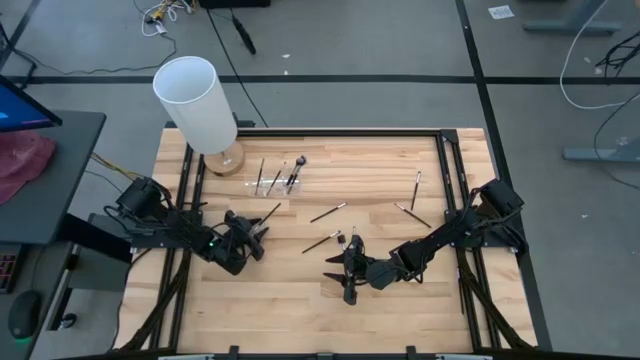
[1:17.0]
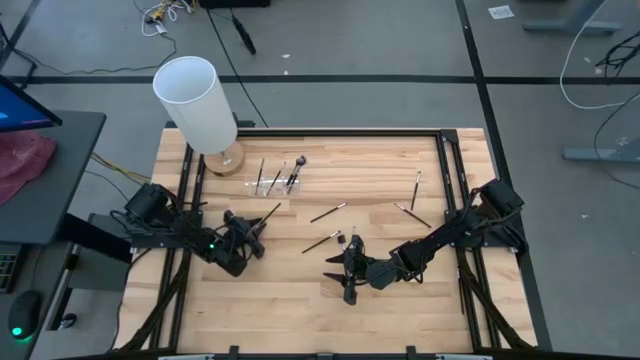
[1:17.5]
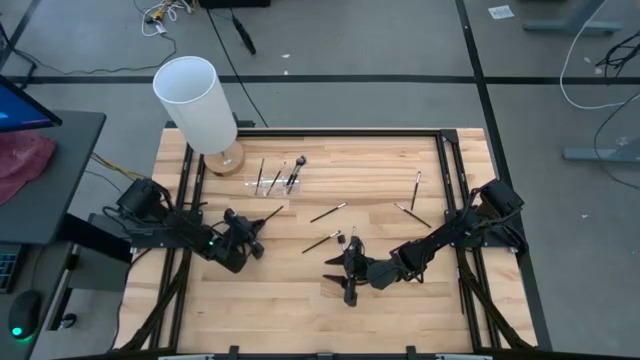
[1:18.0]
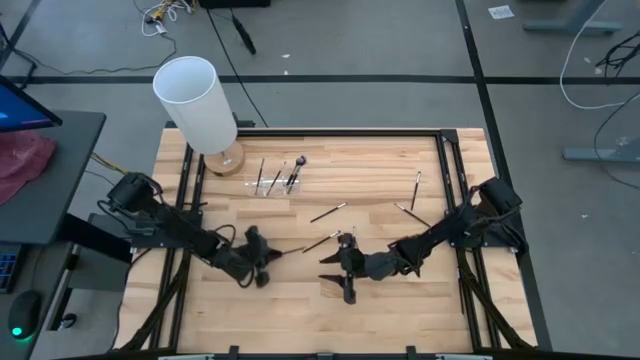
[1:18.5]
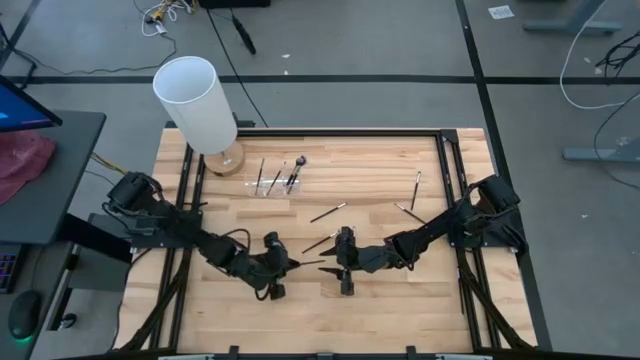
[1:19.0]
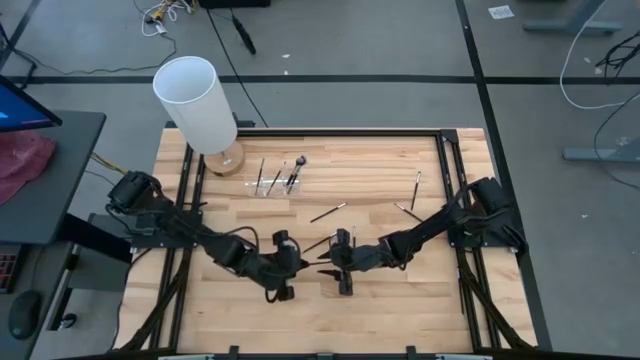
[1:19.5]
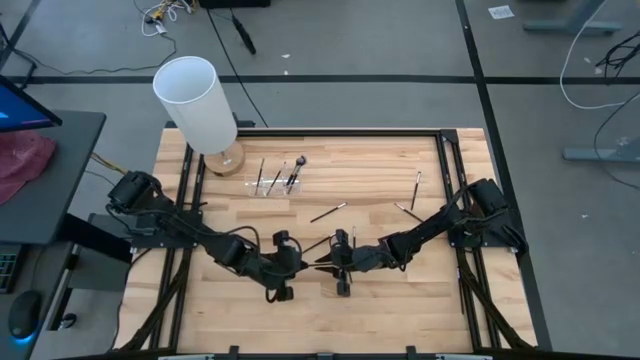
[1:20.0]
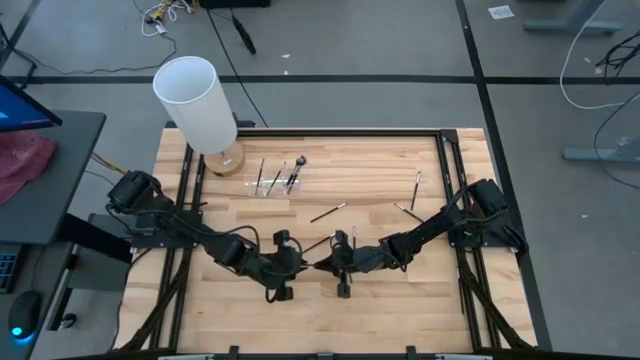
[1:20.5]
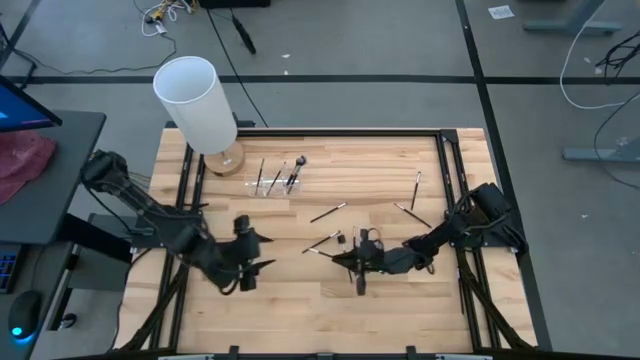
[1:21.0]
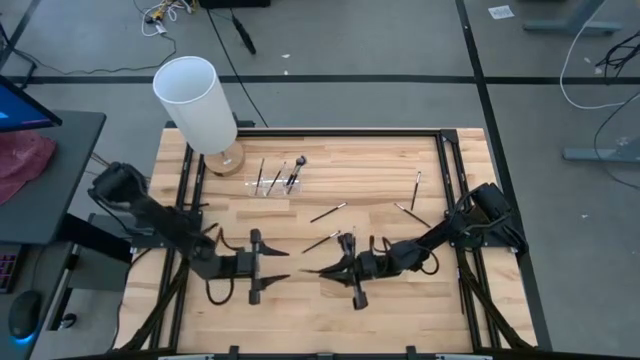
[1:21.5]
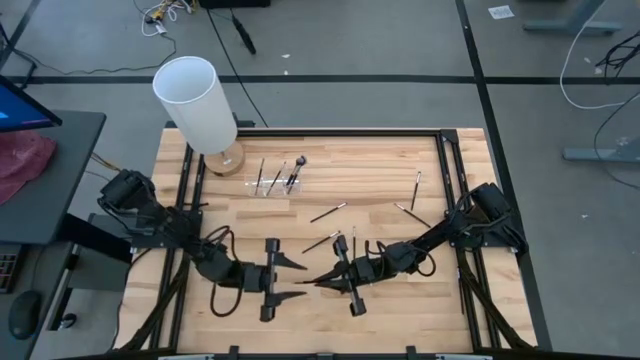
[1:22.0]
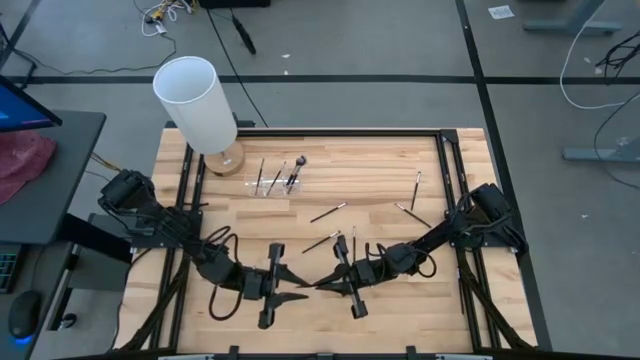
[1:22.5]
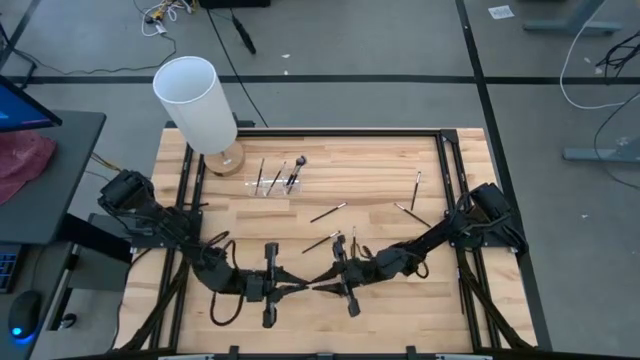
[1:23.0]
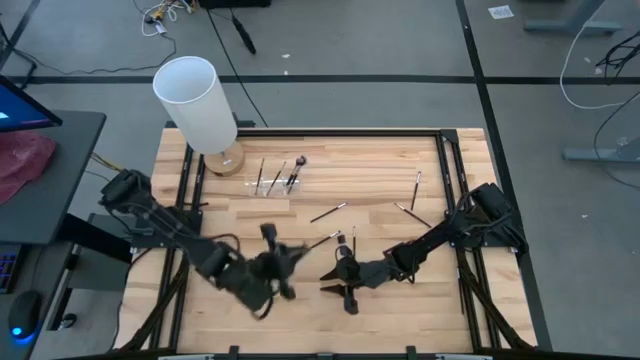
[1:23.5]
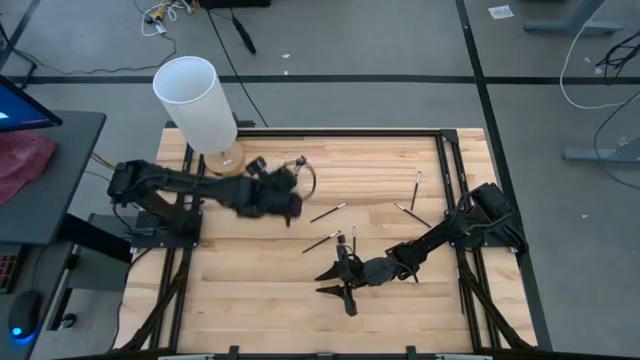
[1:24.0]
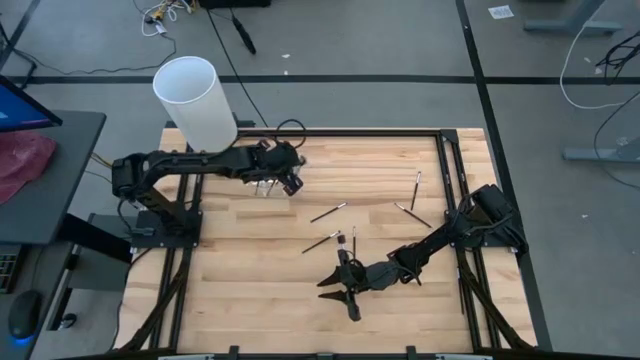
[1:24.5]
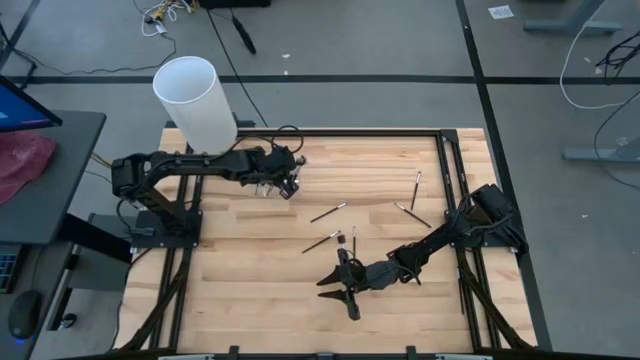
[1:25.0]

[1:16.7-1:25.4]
Task: Put items in baskets/containers
Put the liner brush into the transparent organizer

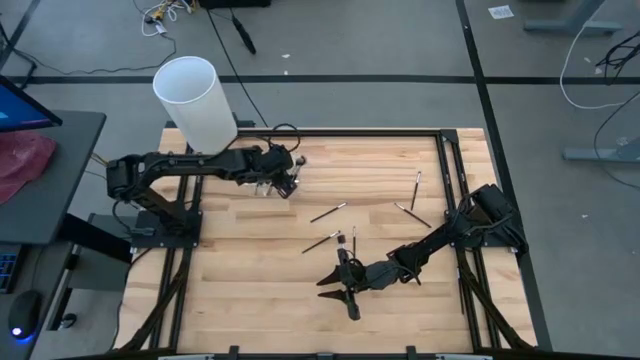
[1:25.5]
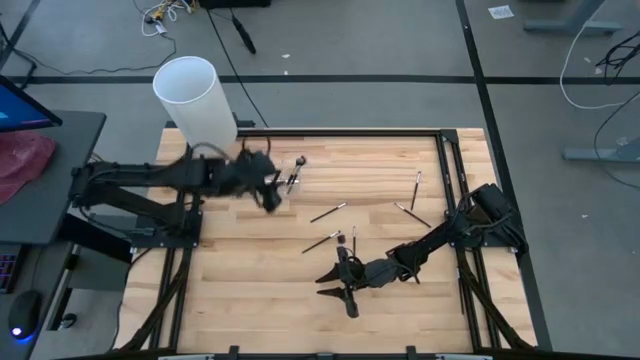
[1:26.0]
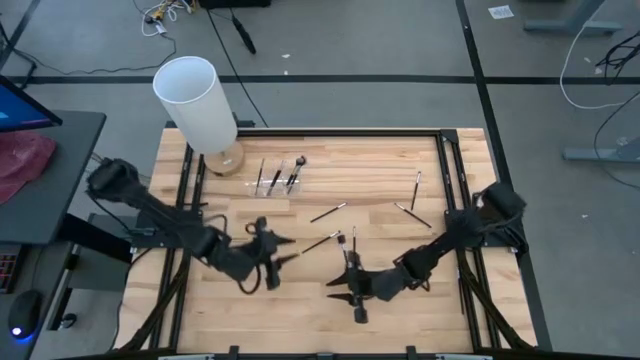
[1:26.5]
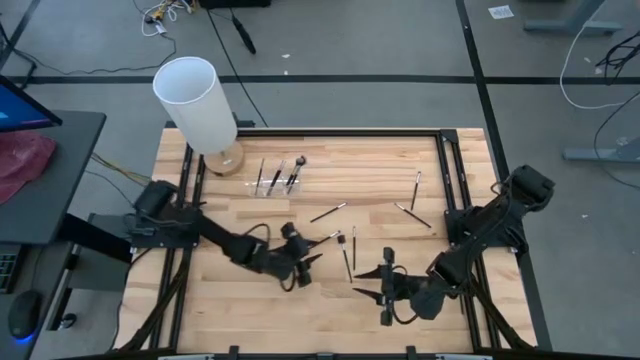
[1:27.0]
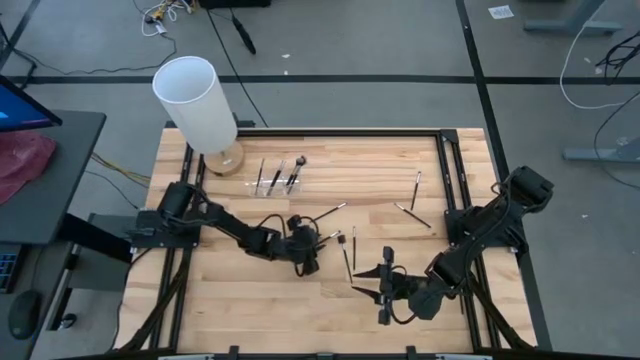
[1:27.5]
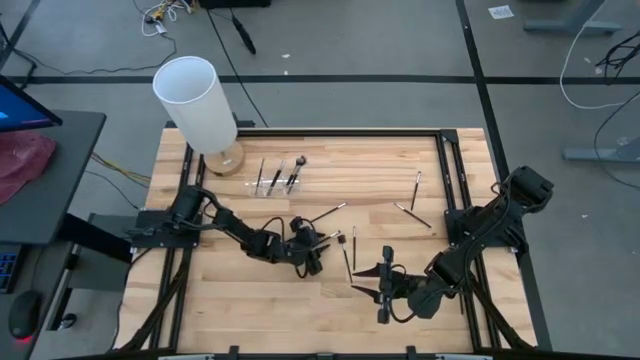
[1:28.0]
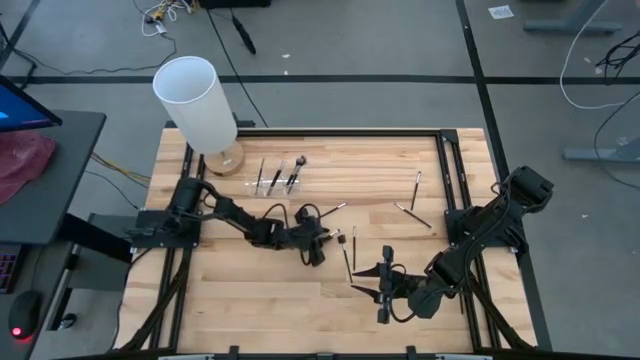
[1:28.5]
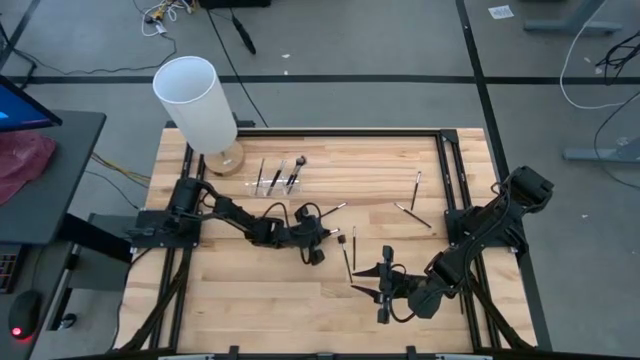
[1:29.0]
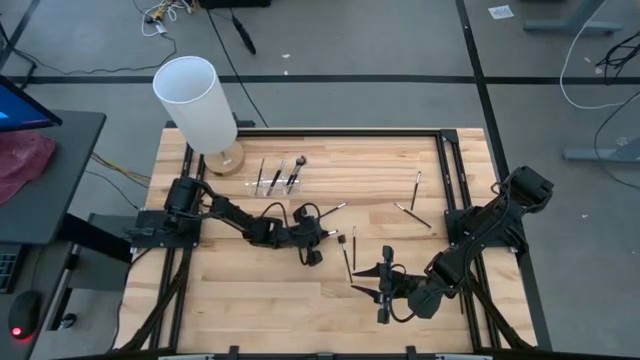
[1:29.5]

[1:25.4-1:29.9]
Put the eyeshadow brush into the transparent organizer

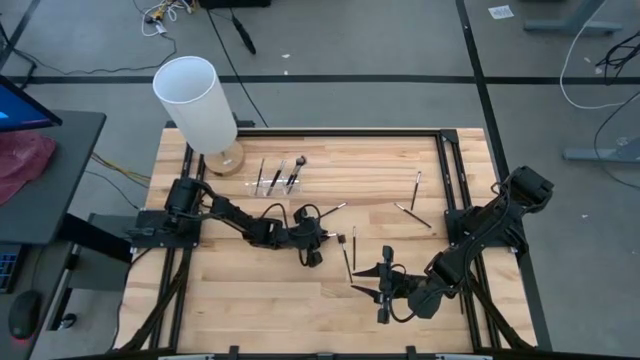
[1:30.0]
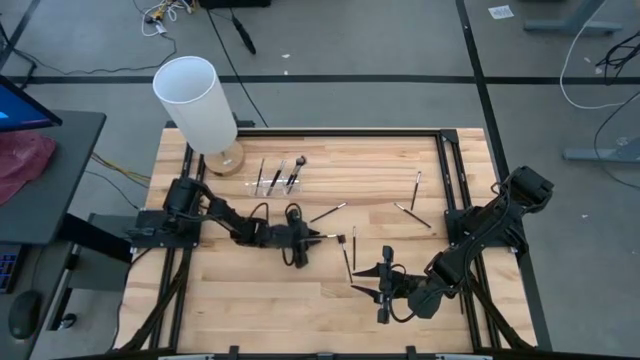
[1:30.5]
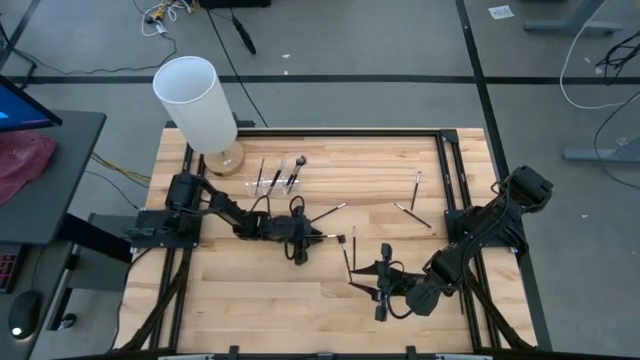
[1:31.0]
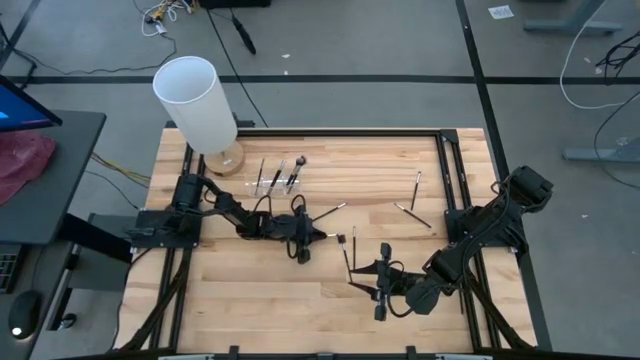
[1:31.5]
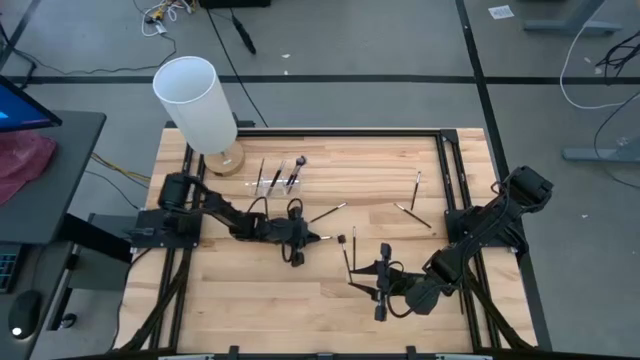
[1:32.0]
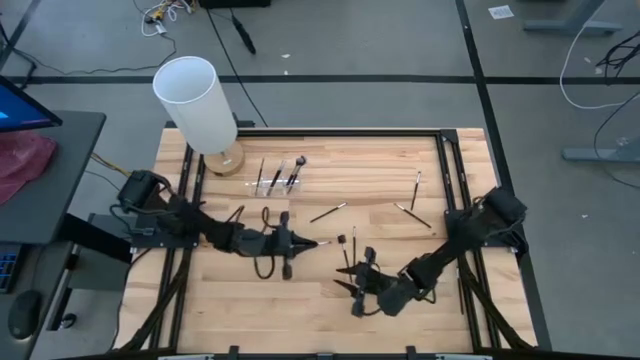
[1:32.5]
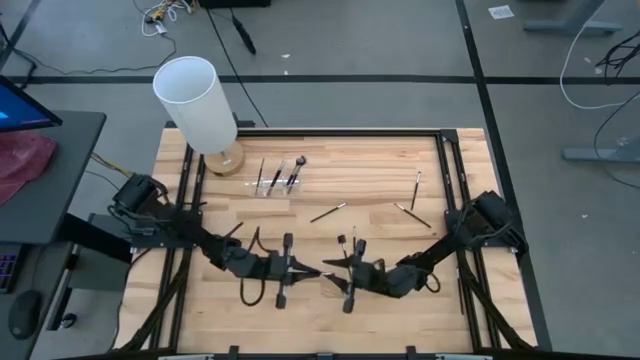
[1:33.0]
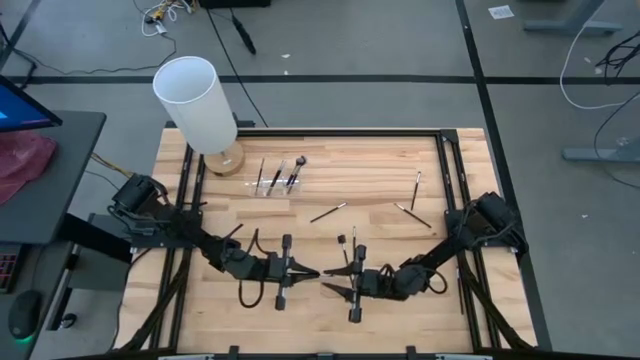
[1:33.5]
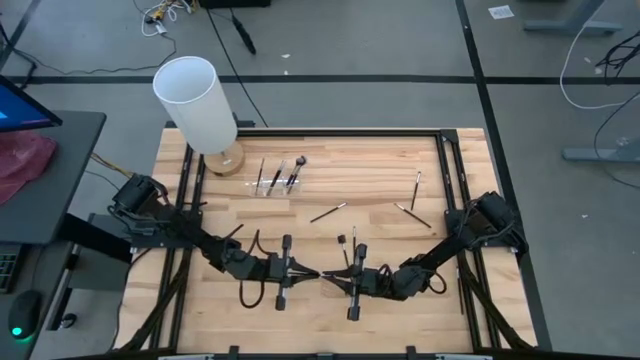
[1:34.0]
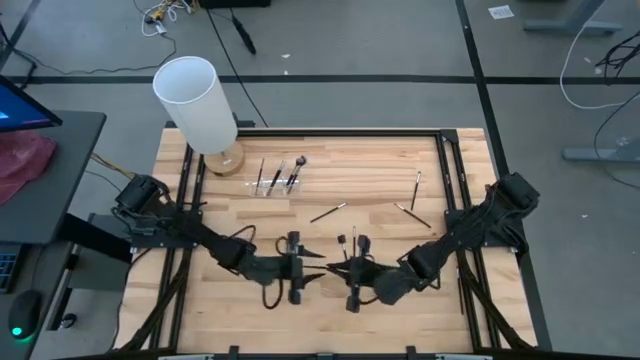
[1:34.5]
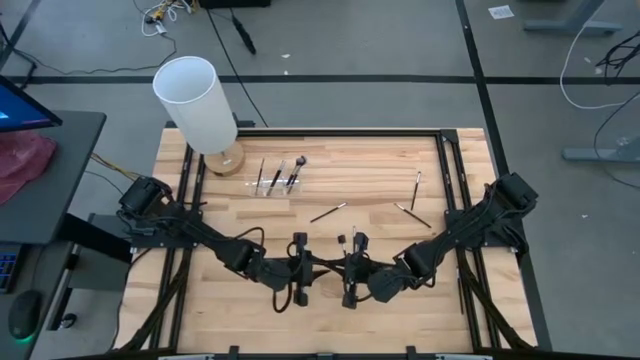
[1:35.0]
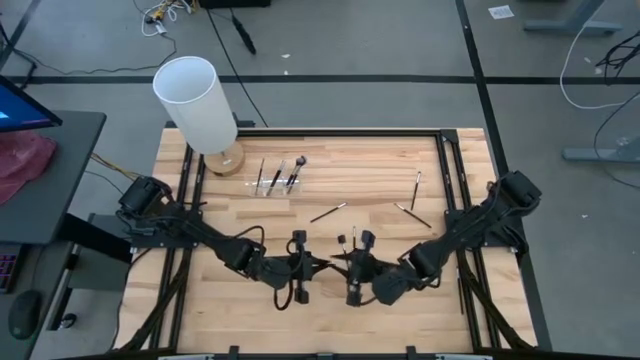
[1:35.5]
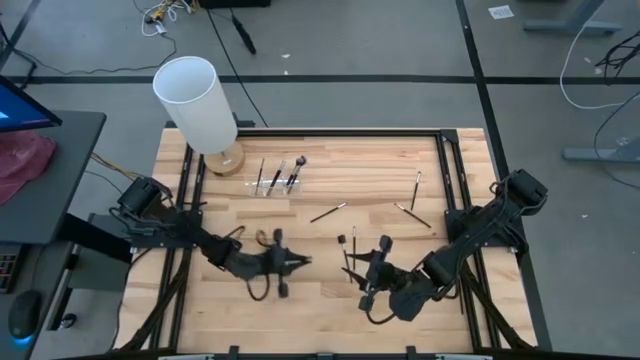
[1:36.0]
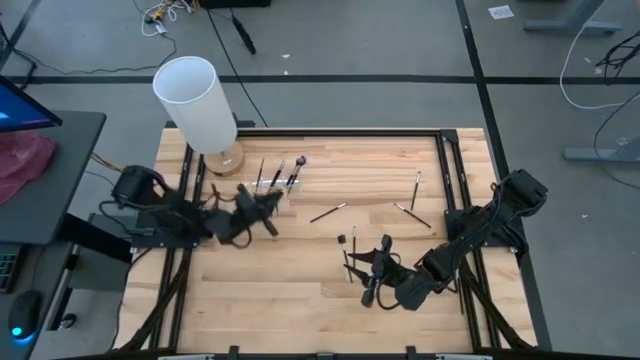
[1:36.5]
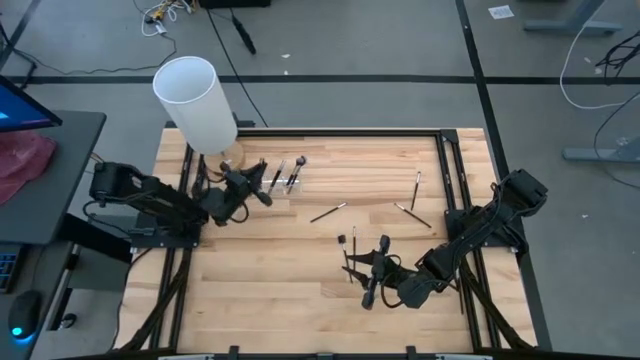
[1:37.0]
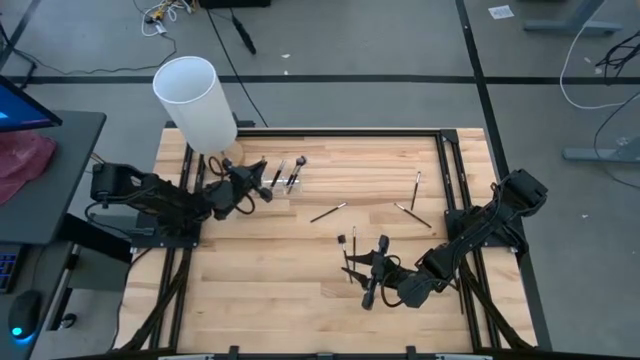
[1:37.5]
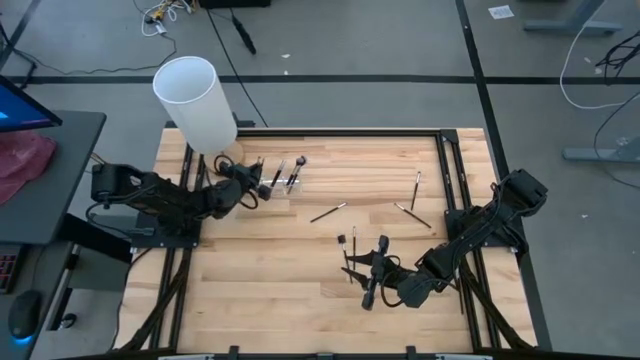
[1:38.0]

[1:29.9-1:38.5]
Put the eyeshadow brush into the transparent organizer
